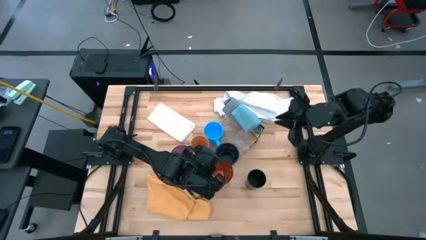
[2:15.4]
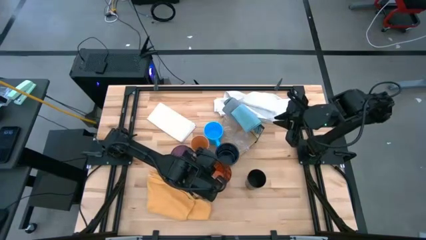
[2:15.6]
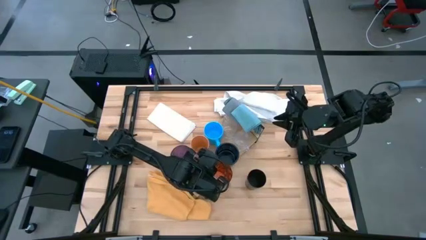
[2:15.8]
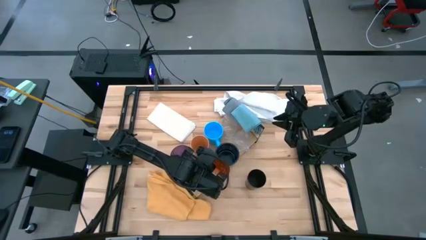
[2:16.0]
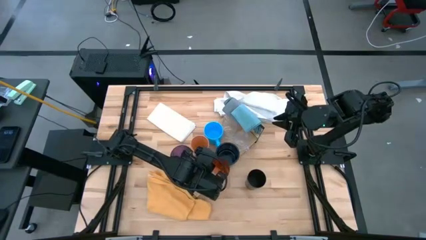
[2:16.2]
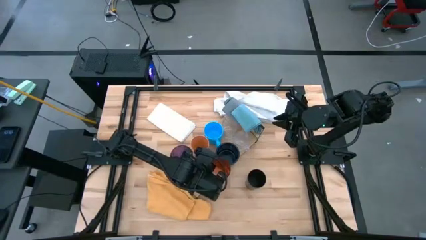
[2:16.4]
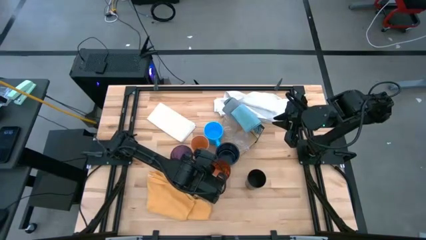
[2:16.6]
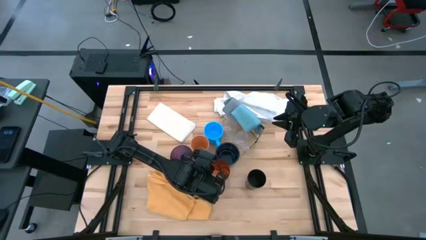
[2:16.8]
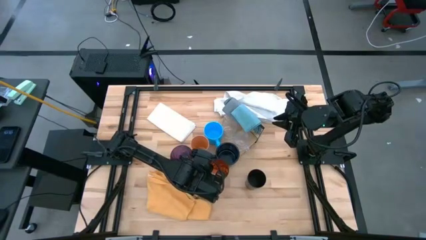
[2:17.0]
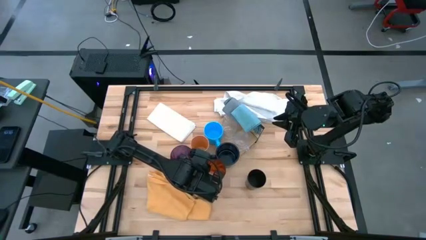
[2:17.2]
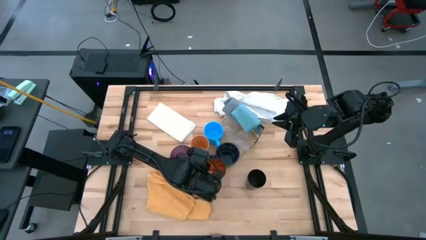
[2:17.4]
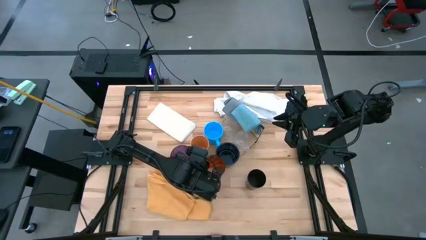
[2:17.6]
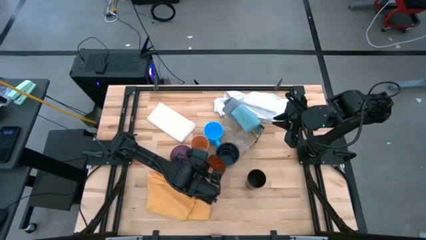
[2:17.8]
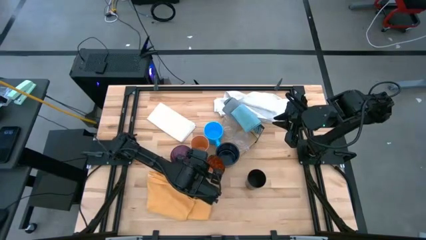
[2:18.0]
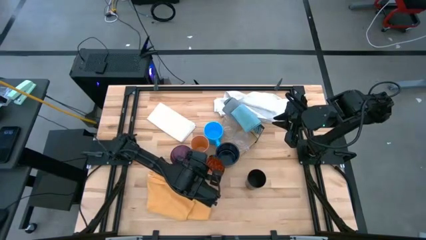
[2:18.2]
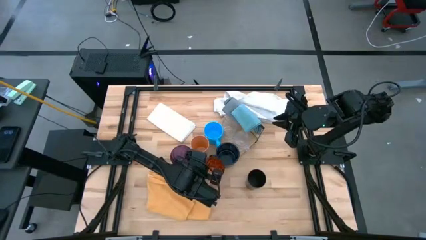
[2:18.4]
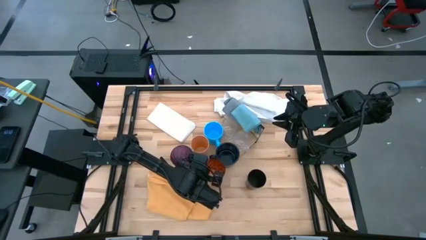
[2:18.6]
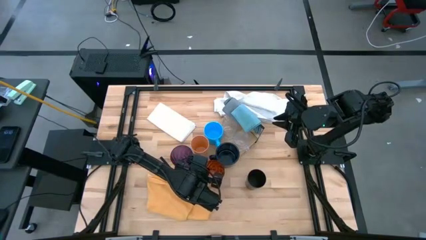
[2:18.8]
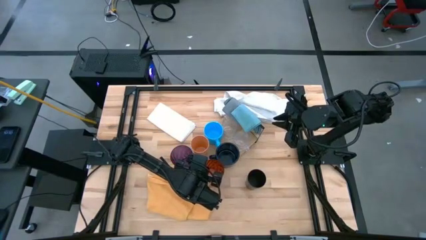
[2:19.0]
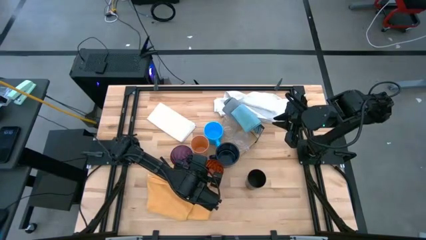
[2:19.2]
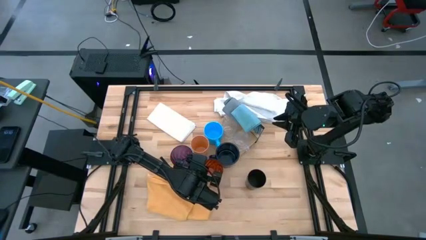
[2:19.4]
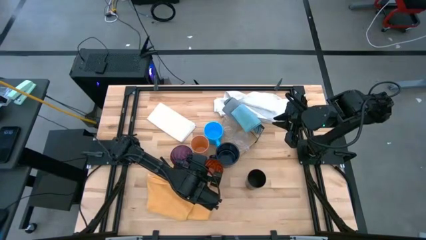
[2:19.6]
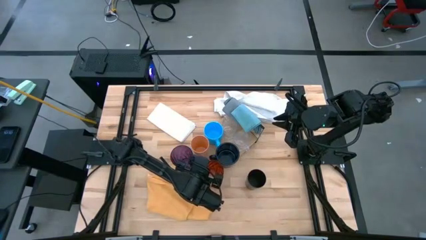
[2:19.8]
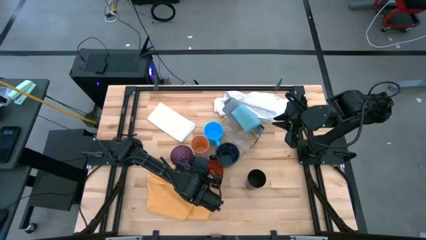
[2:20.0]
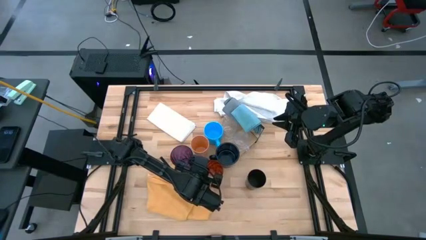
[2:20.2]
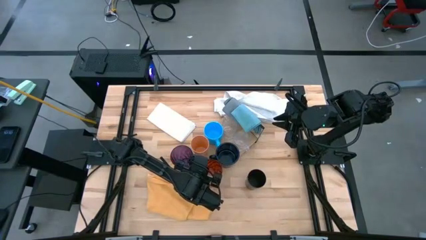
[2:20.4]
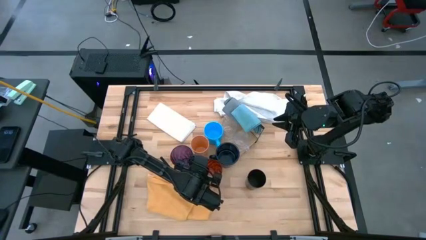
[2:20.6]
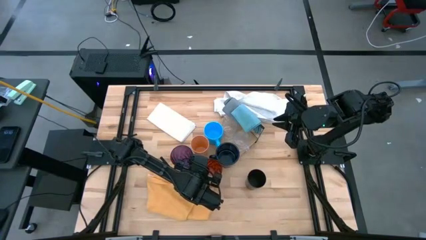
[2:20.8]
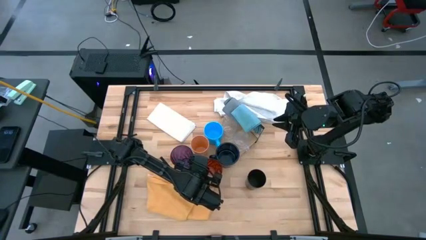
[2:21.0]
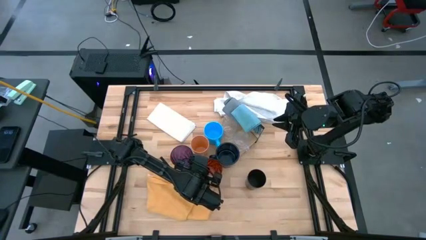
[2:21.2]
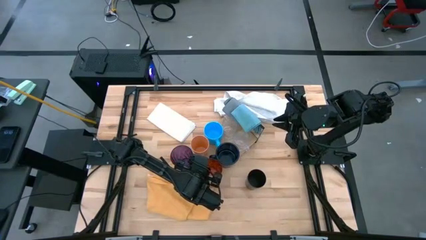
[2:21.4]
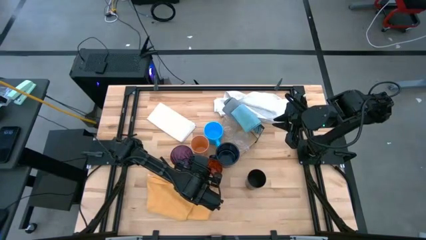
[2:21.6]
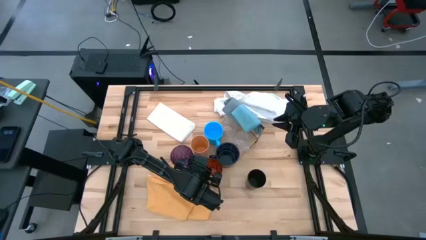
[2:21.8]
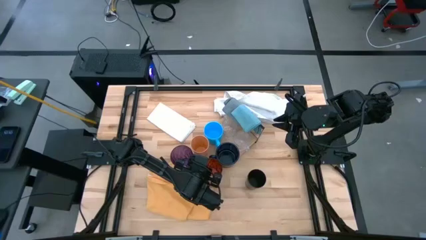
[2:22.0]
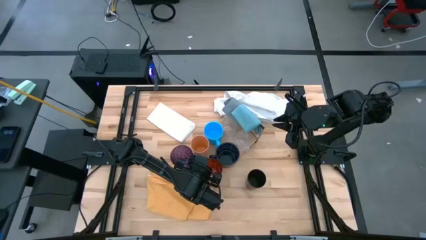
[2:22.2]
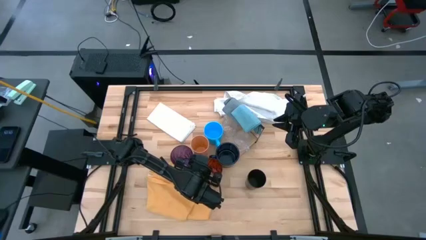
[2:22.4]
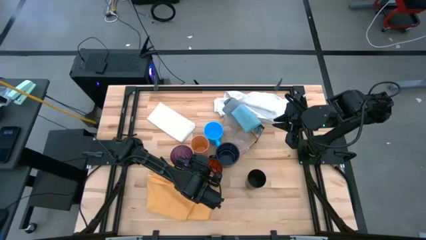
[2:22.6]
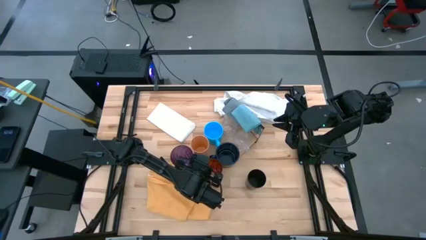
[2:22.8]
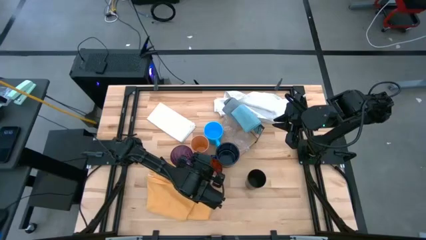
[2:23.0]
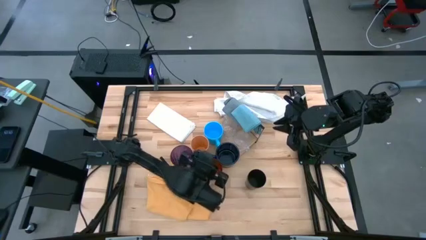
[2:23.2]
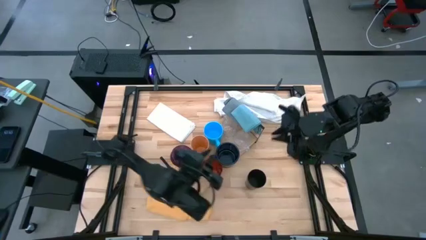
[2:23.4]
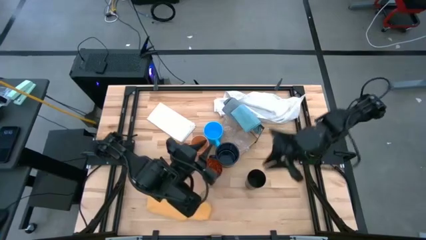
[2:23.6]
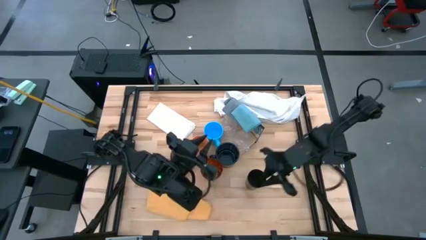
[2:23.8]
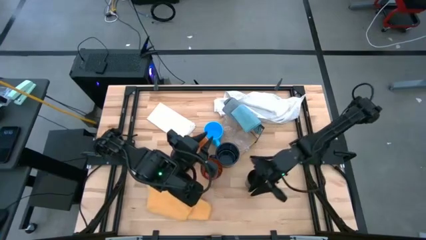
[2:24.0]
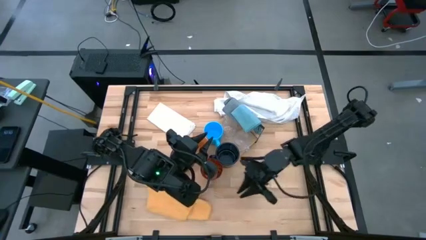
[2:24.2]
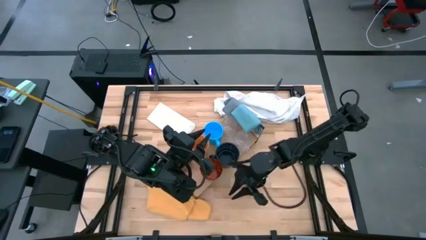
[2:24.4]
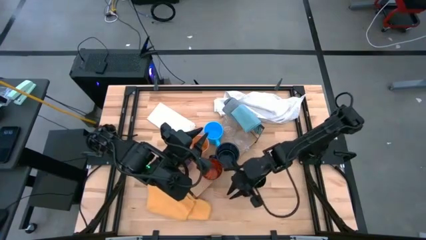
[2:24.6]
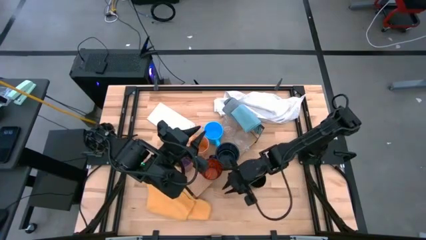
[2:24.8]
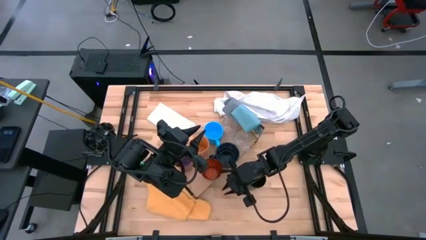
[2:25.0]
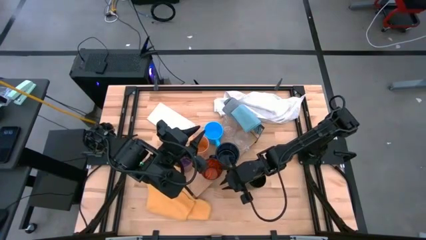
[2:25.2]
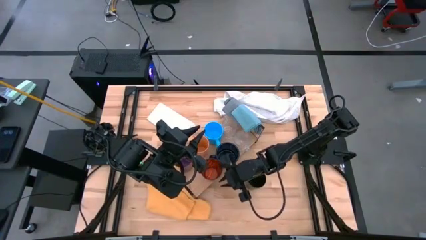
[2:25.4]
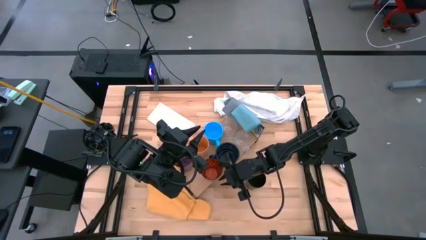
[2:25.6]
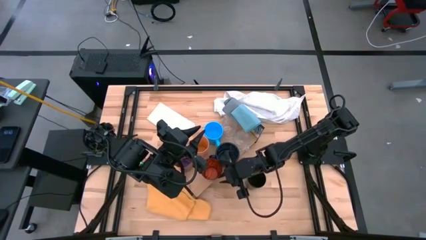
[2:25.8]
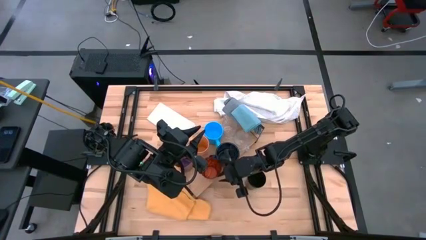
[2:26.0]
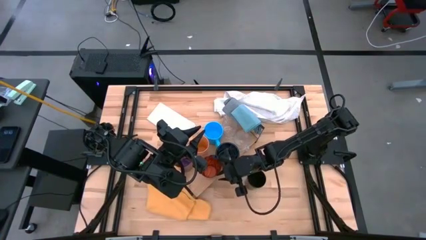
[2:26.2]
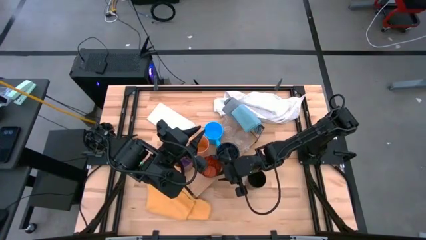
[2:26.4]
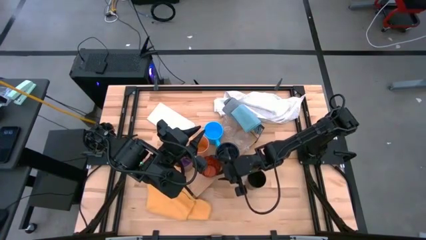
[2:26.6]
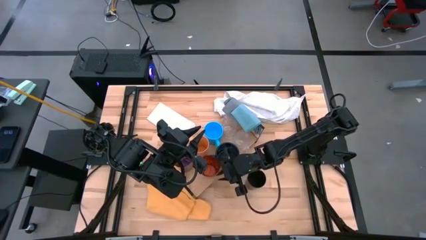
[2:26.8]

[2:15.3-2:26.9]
Task: Stack small to large cups/mugs on shelf
Put the orange glass on the shelf
